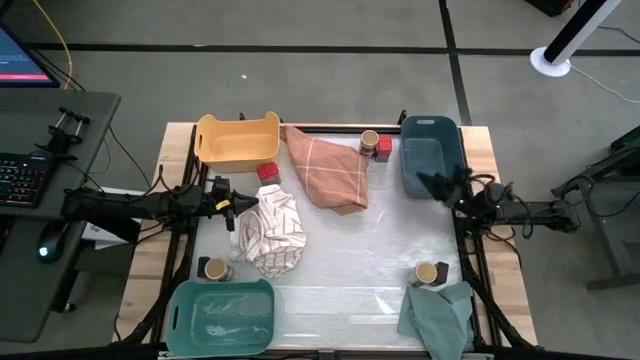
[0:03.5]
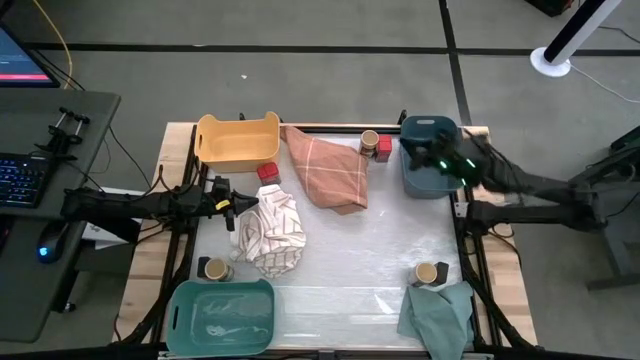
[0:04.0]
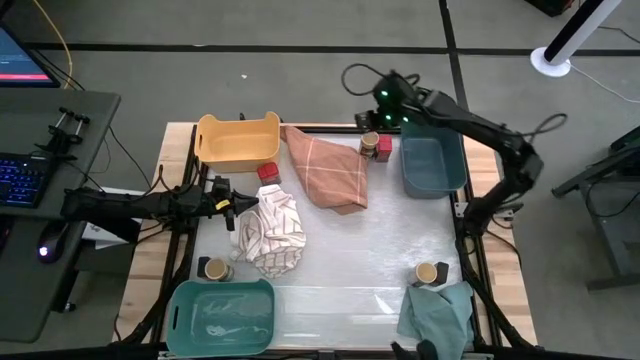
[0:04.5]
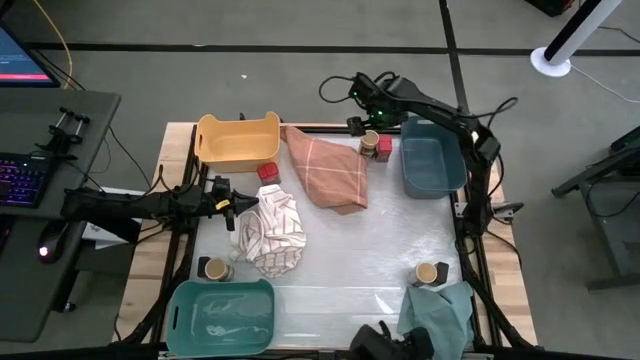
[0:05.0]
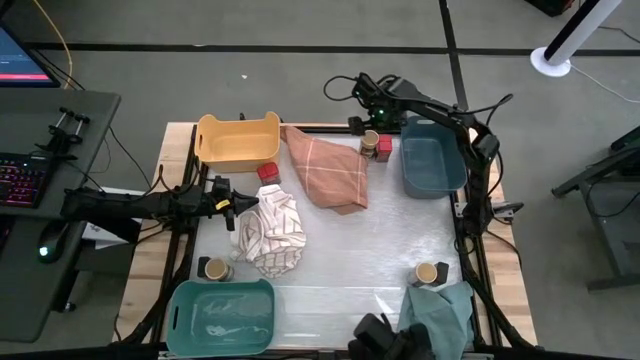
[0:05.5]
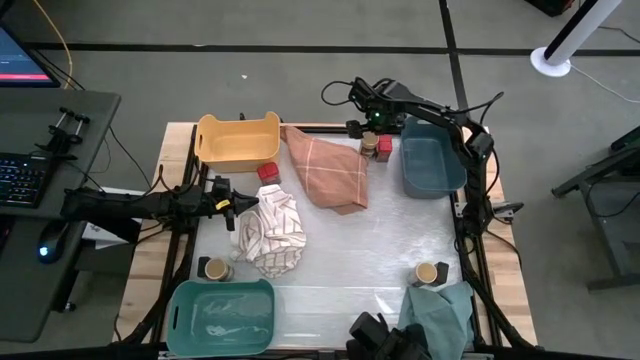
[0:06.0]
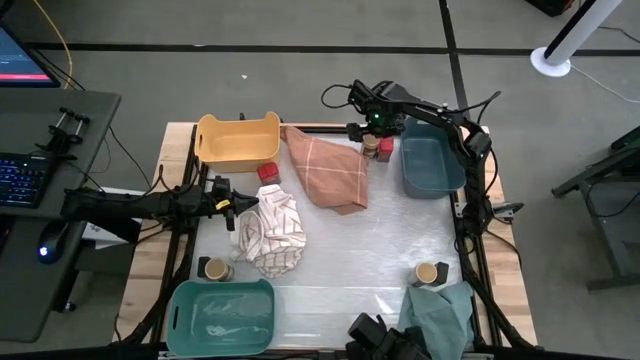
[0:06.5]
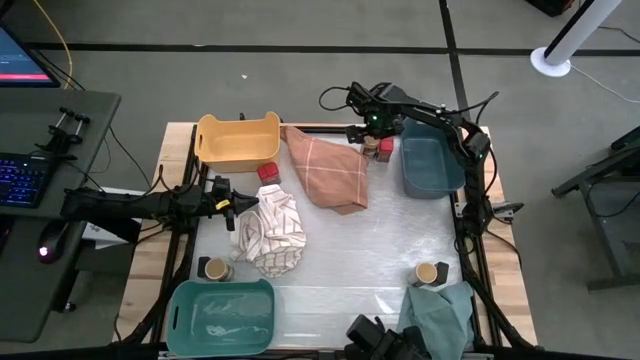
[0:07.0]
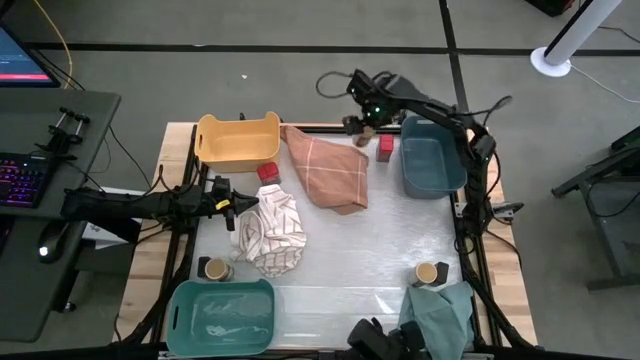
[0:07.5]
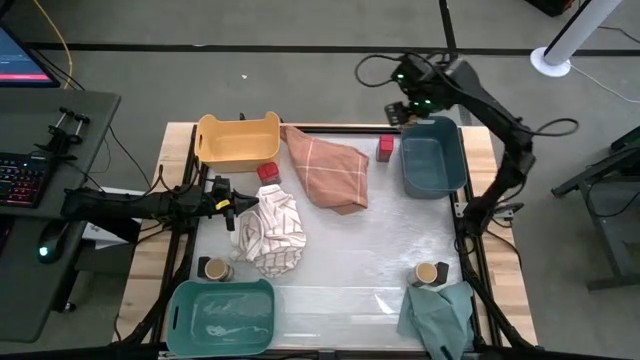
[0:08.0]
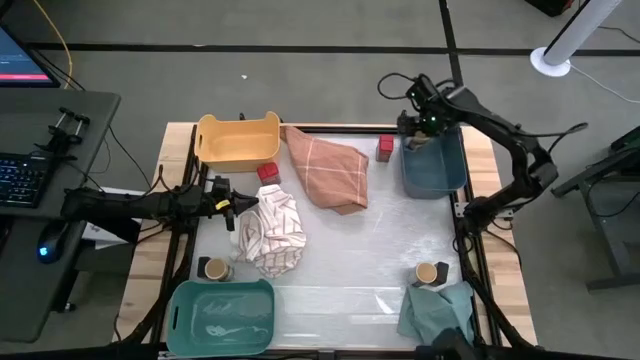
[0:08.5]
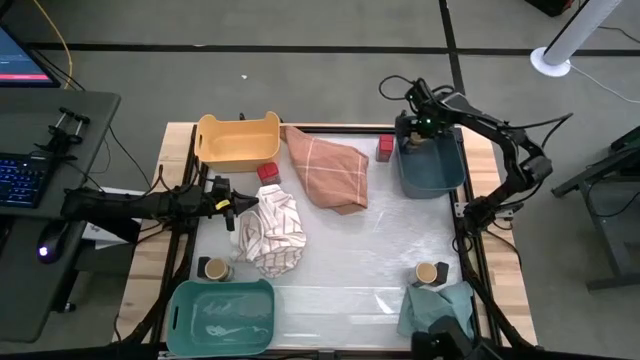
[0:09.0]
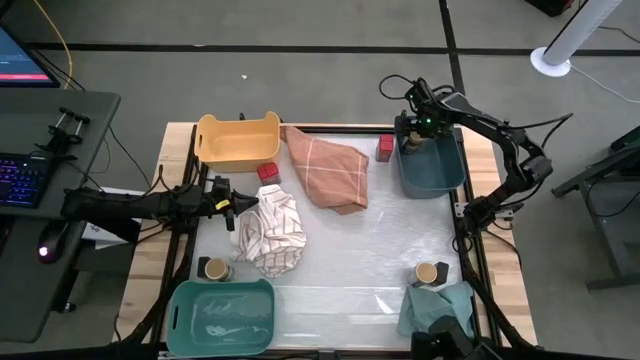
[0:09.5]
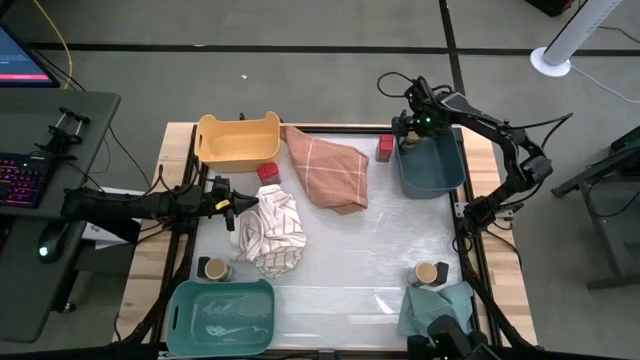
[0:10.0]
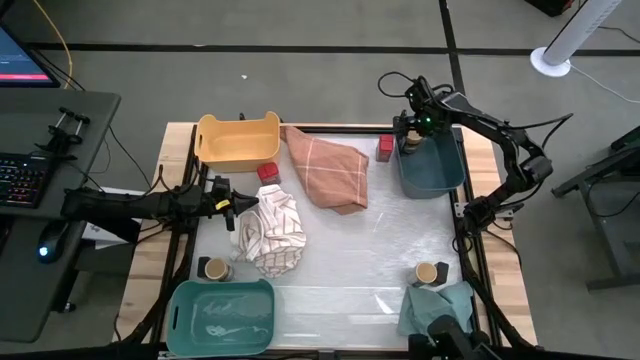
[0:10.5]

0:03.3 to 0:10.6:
Task: Sort spices by type
Put the top gold seasoning bottle into the blue bin

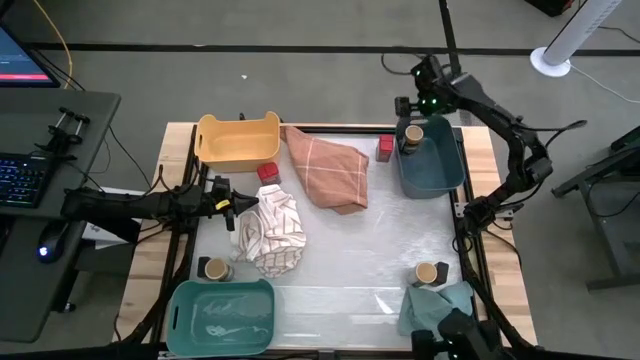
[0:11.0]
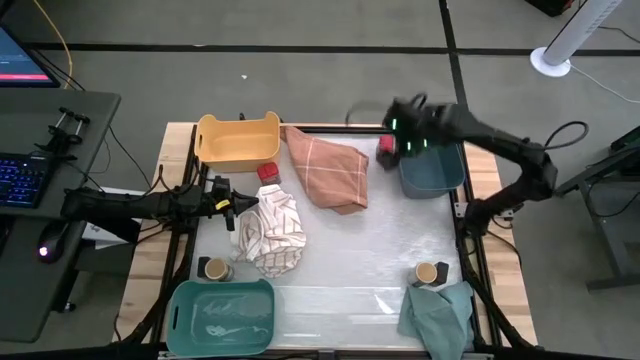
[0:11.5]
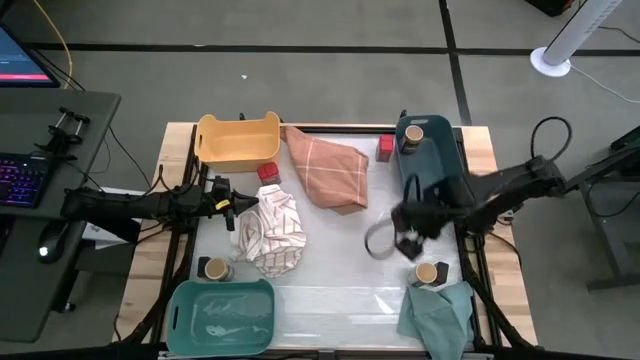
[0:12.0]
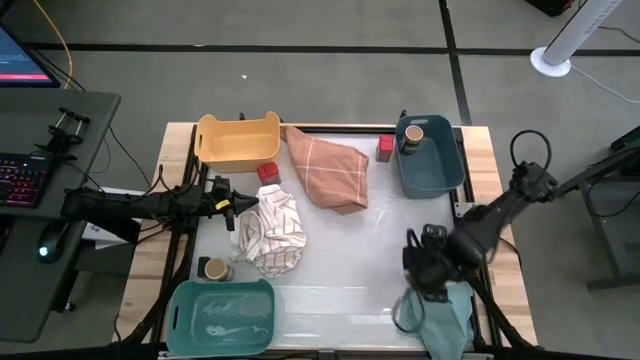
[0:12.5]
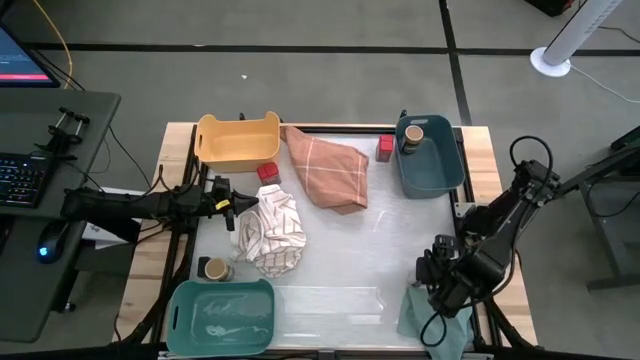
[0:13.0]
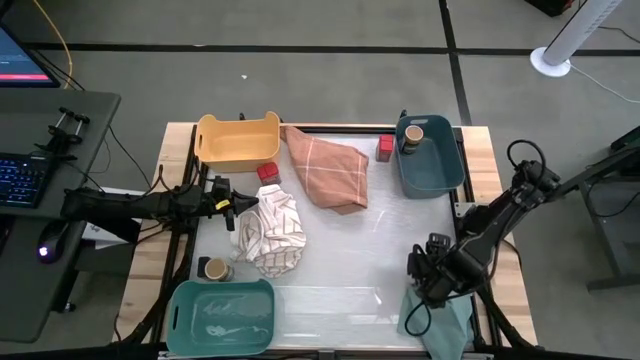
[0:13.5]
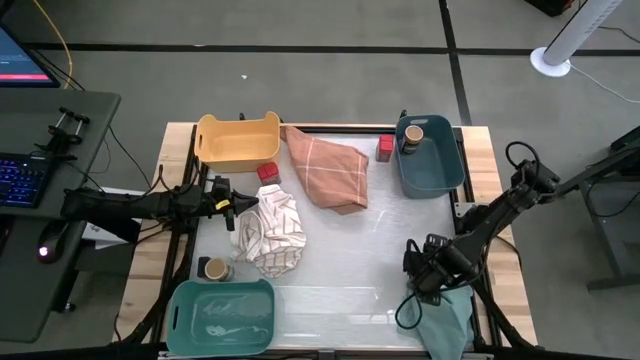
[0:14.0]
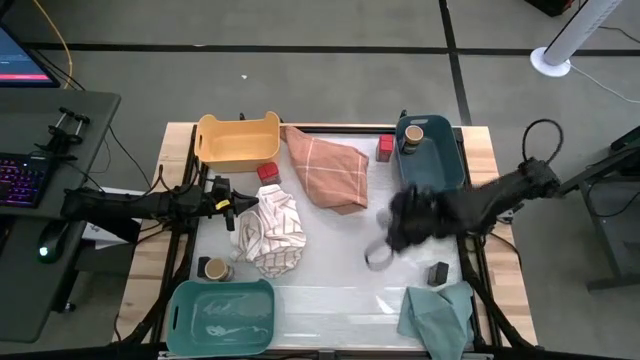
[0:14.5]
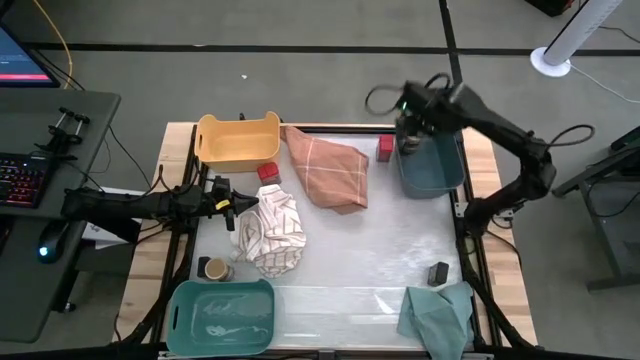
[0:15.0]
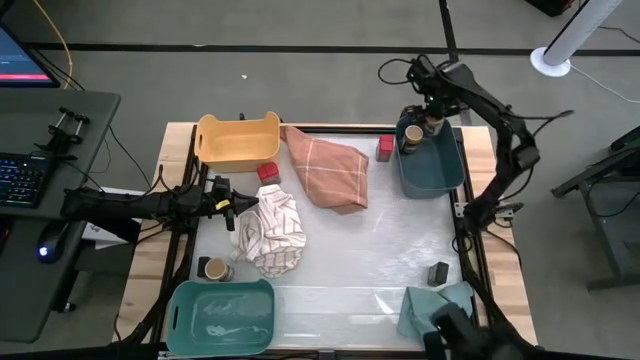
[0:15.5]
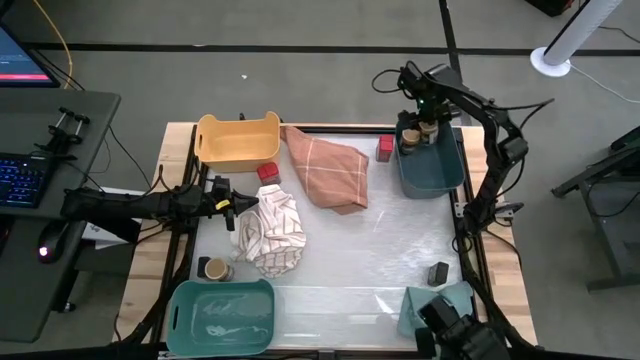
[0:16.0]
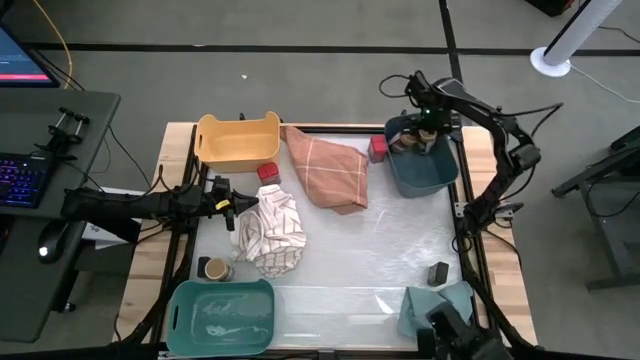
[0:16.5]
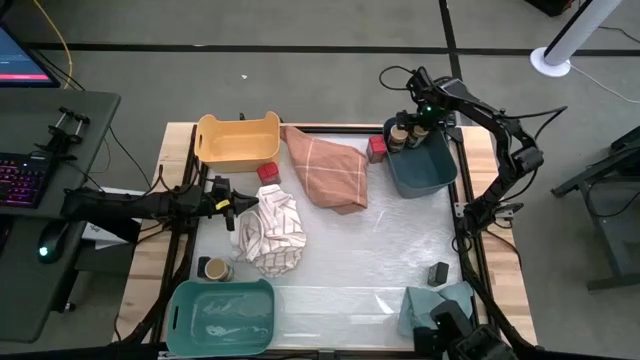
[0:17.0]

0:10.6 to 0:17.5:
Put the right gold seasoning bottle into the blue bin

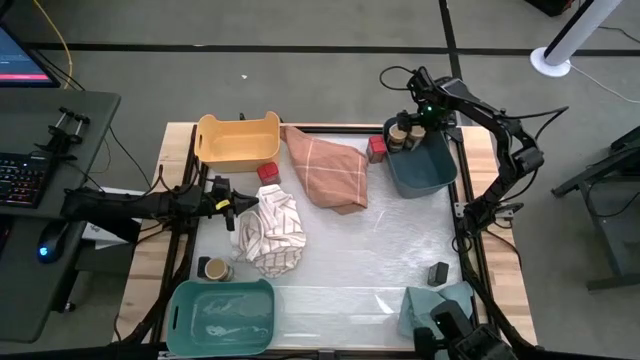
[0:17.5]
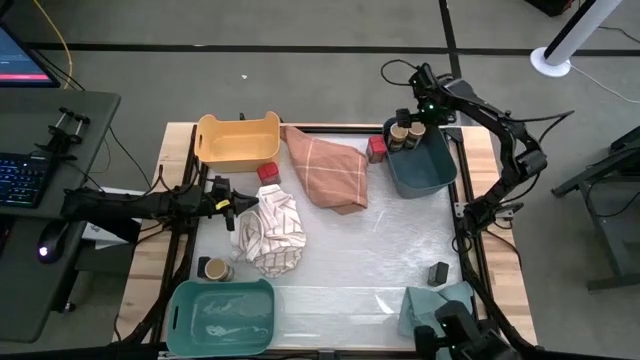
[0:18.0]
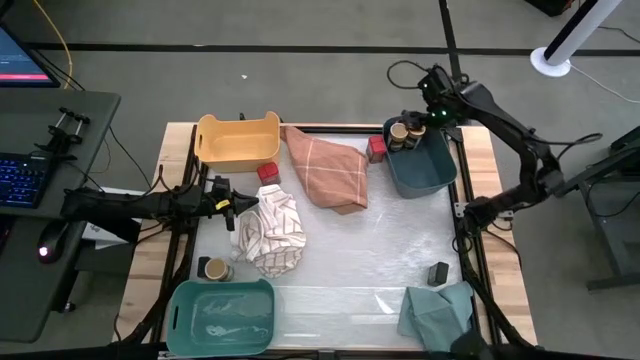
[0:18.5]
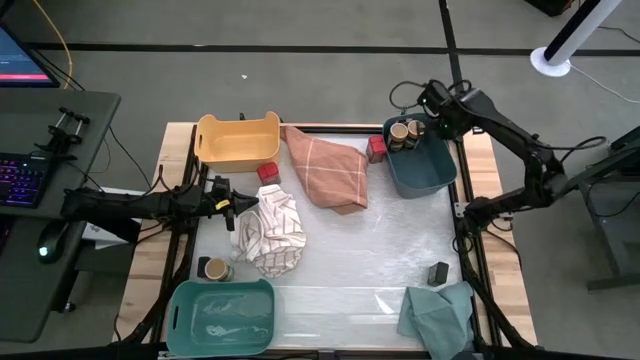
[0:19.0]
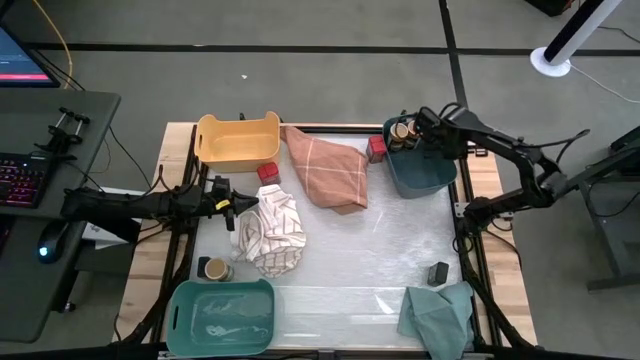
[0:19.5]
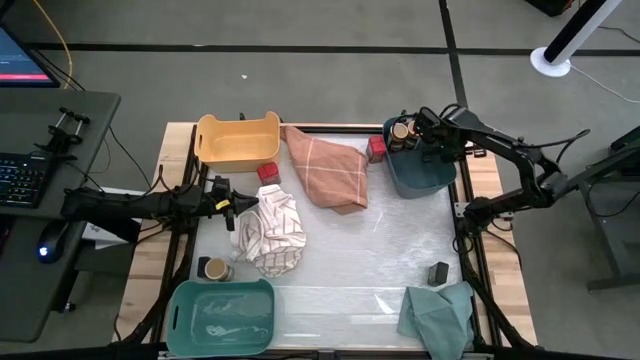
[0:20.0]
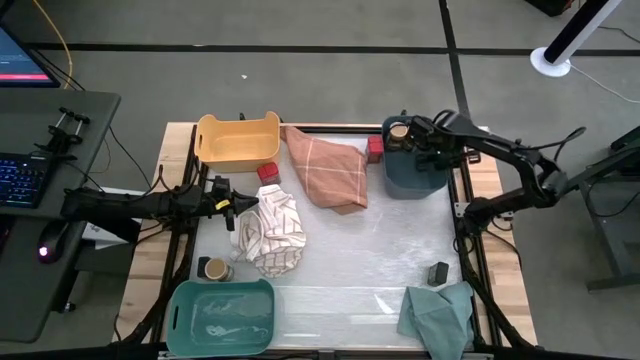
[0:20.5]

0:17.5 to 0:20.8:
Adjust the blue bin

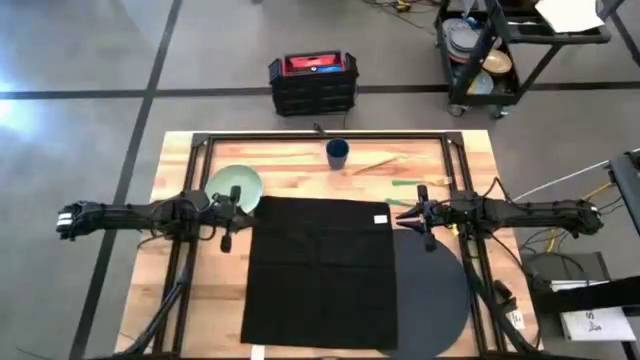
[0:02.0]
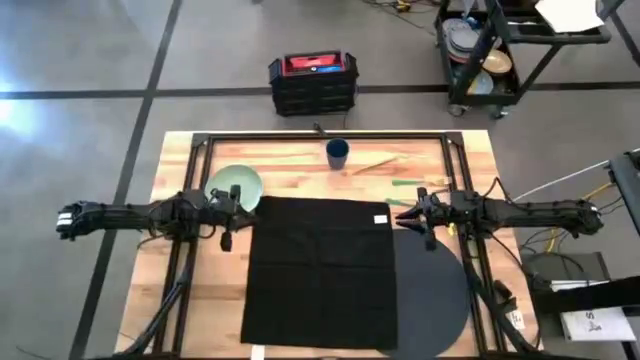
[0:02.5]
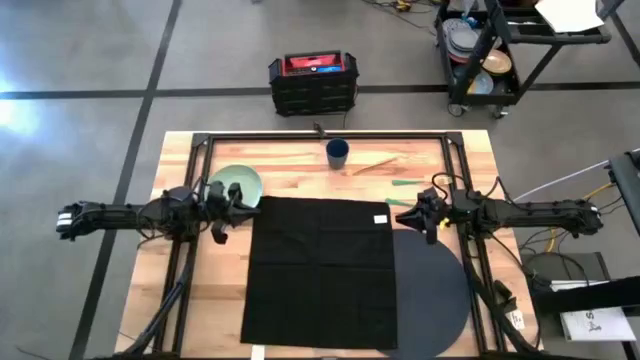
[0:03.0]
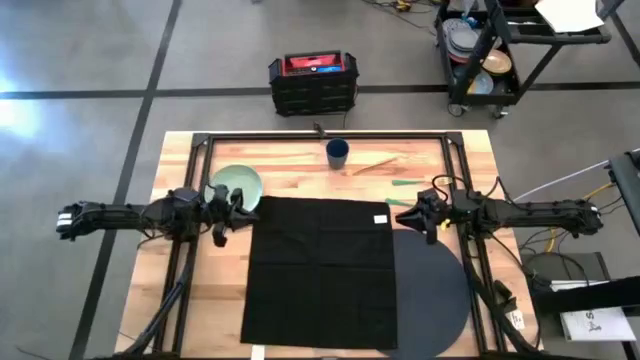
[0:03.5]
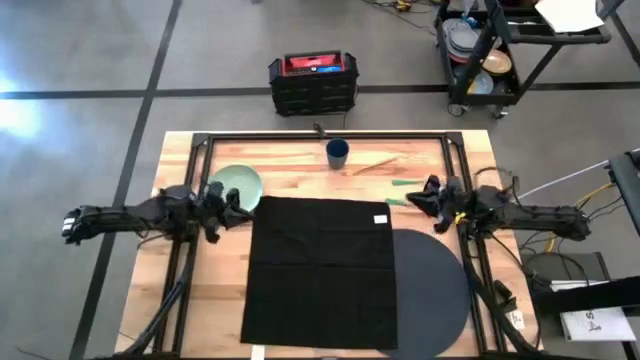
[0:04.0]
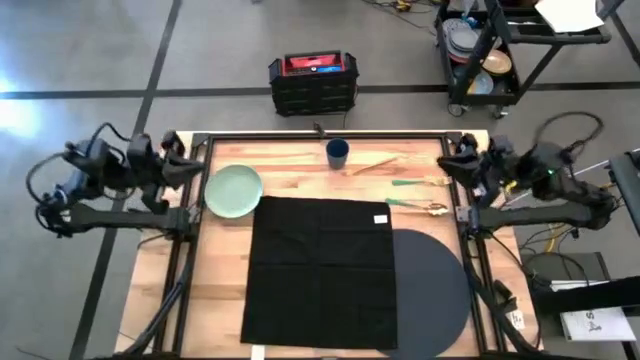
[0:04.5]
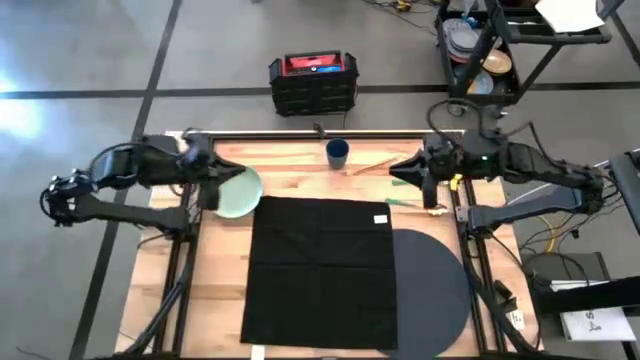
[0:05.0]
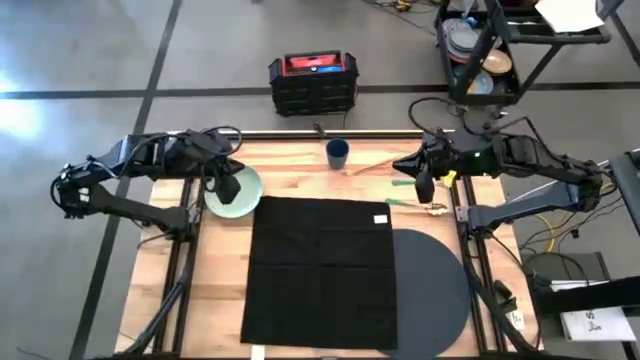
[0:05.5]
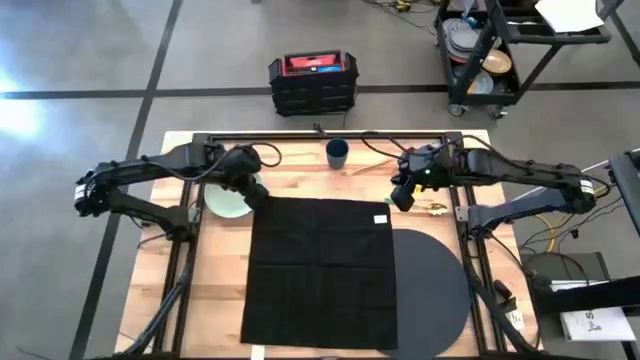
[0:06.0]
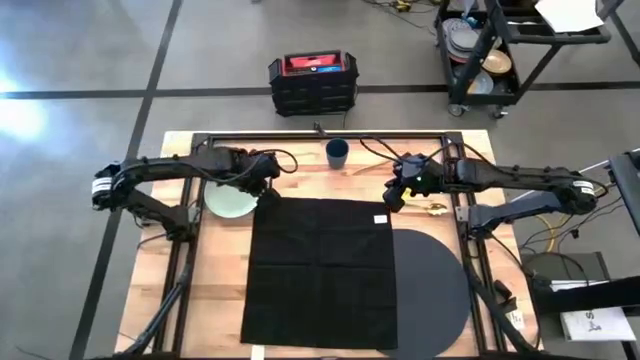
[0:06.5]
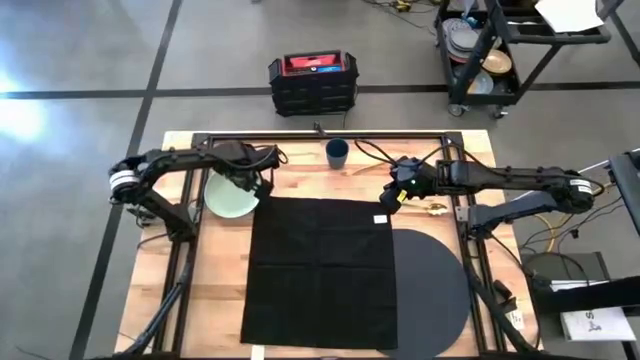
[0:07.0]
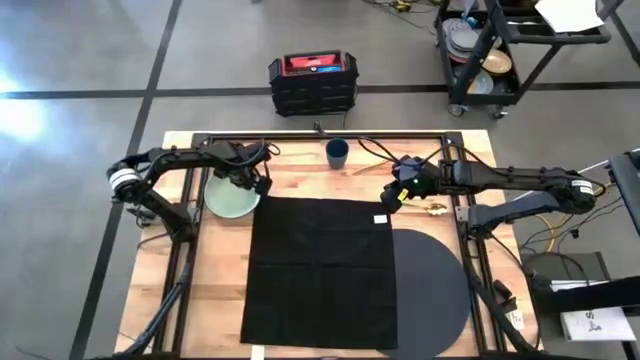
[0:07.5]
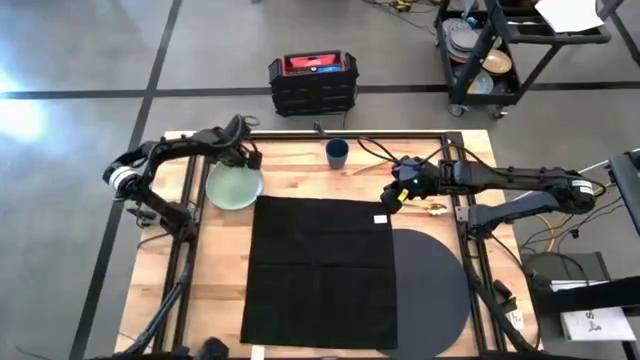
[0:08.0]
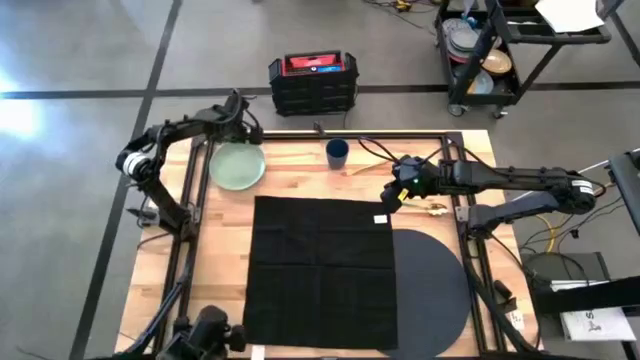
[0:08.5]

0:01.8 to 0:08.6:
Task: Set table place
Adjust the green plate
